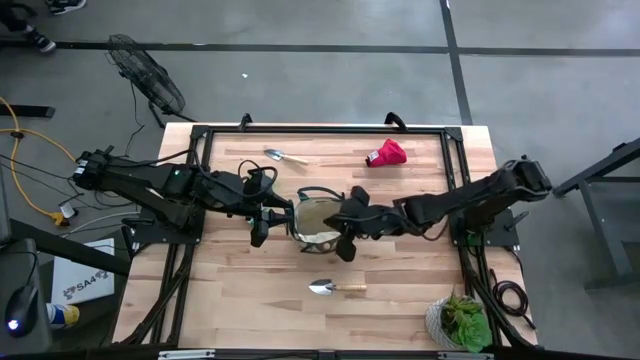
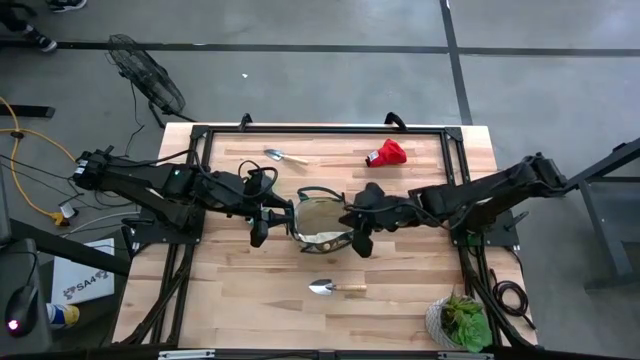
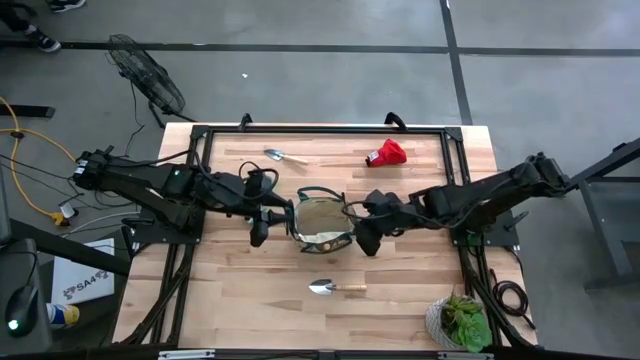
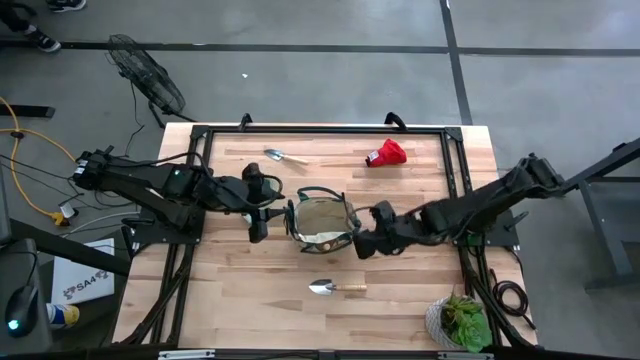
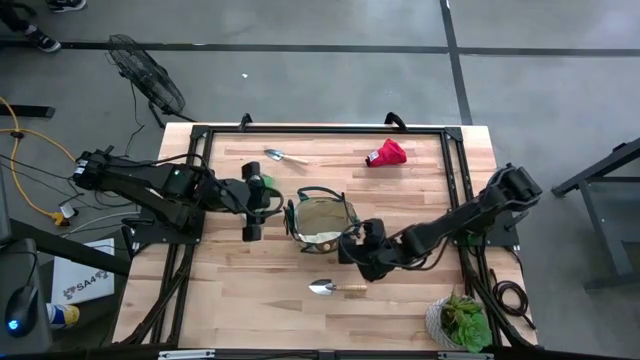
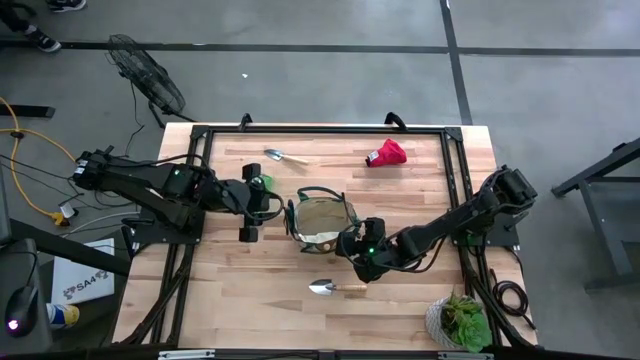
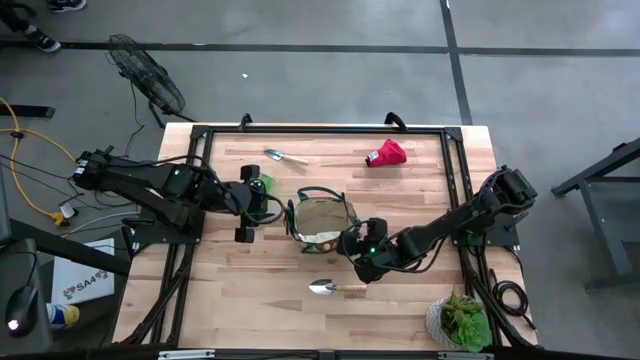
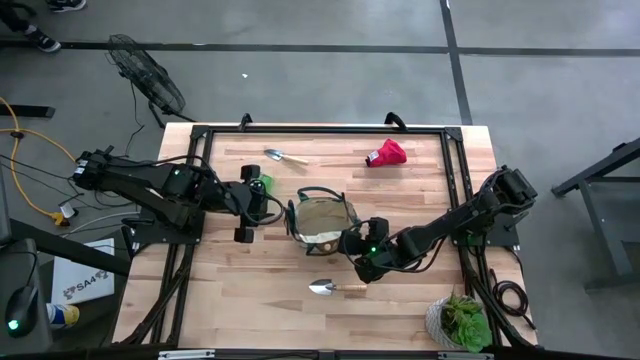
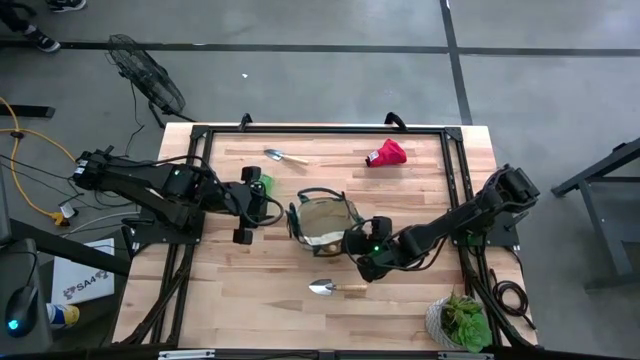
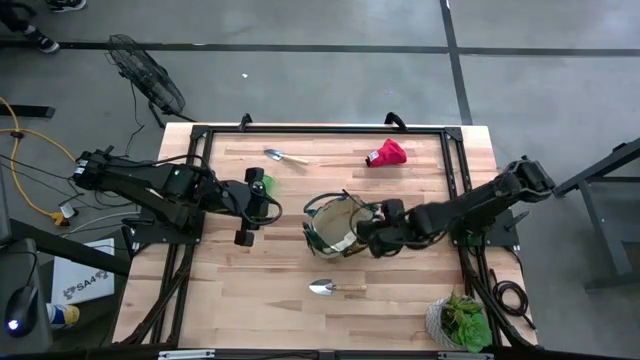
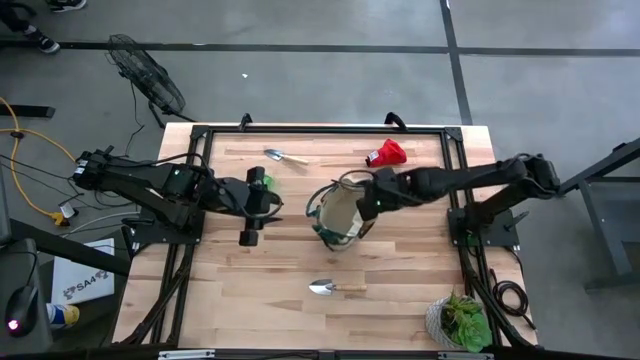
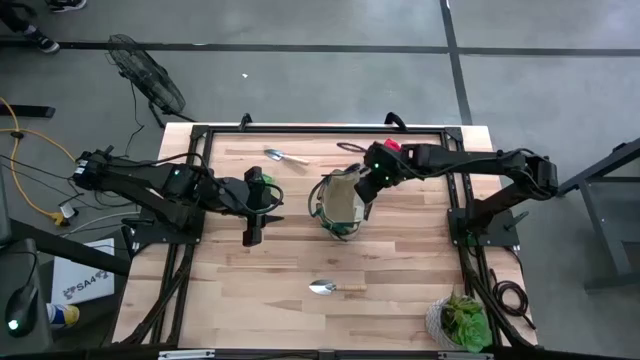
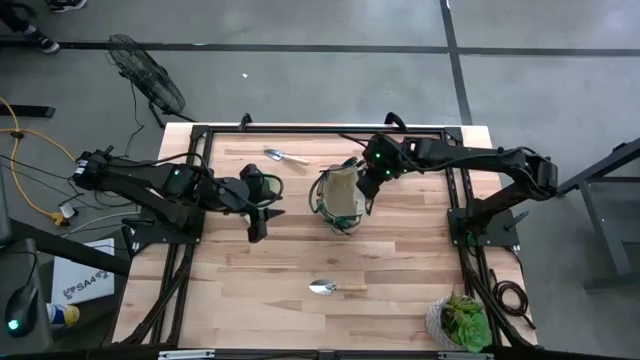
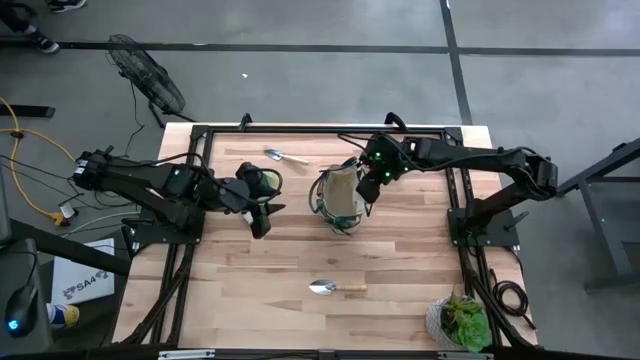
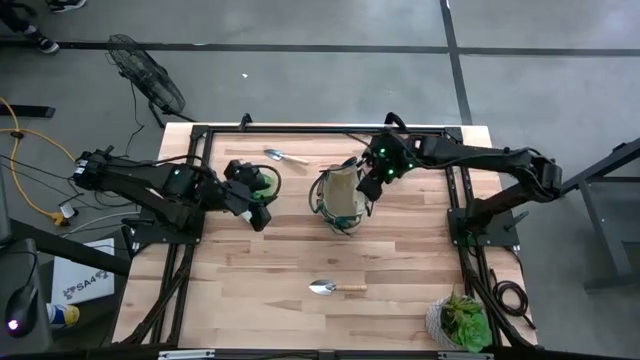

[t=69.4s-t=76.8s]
Task: Pick & Place Garden tools in Gardening bag
Adjust the gardening bag

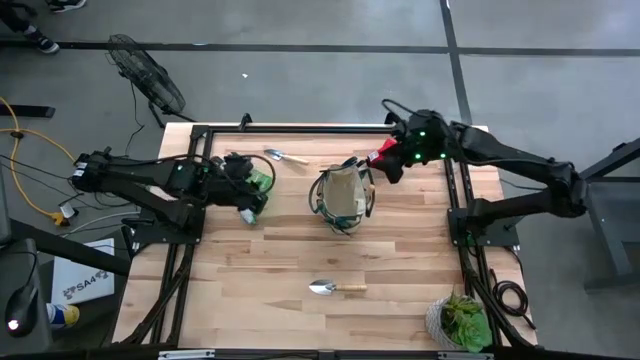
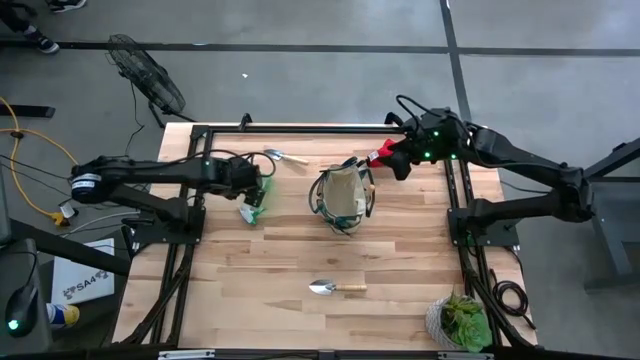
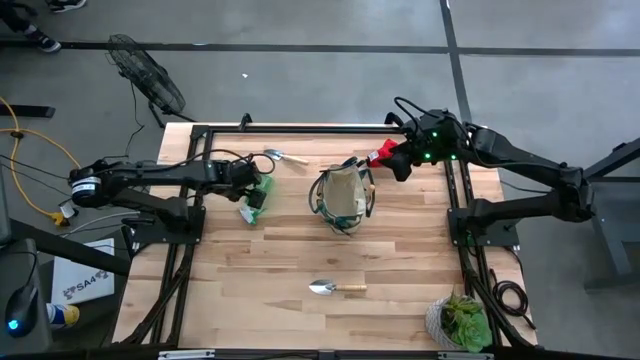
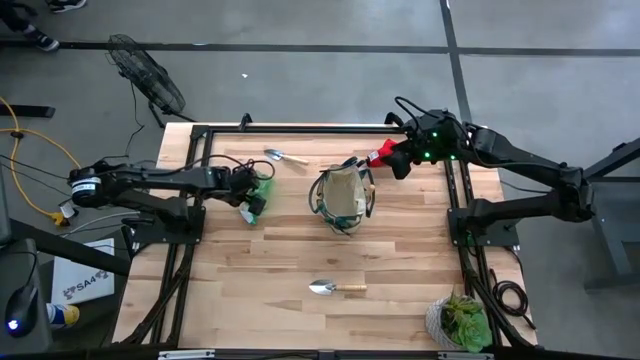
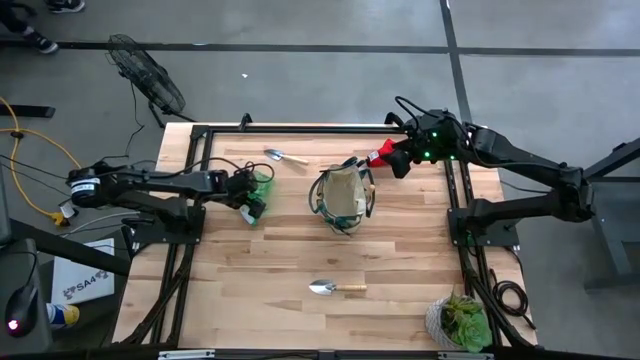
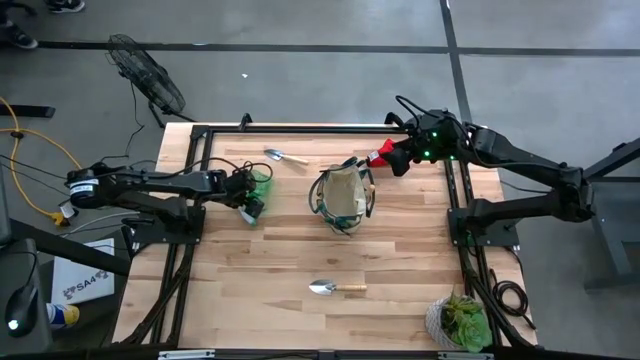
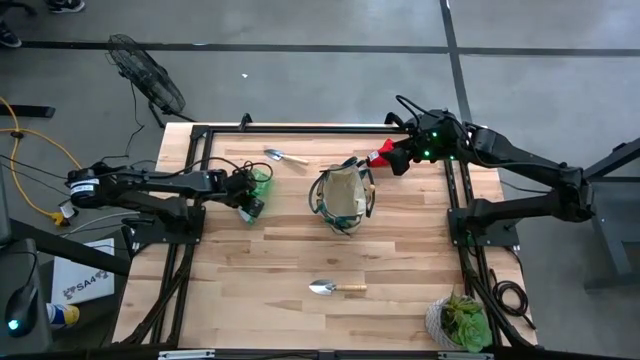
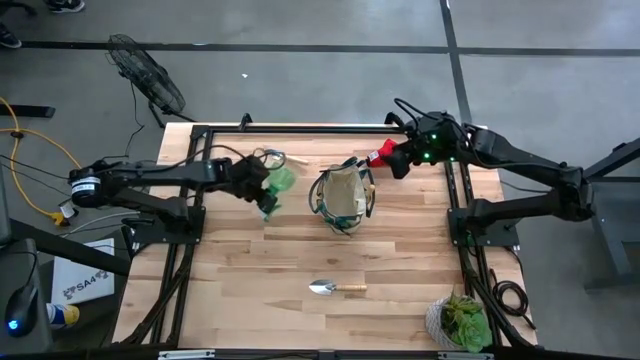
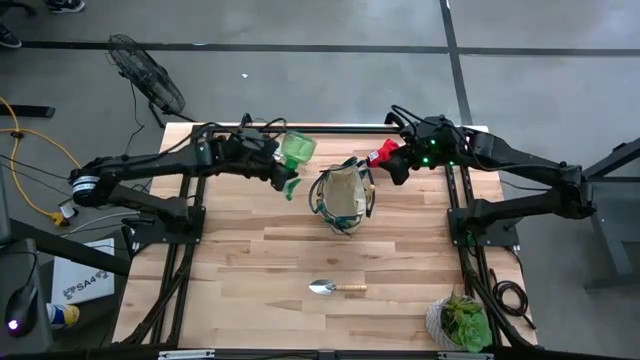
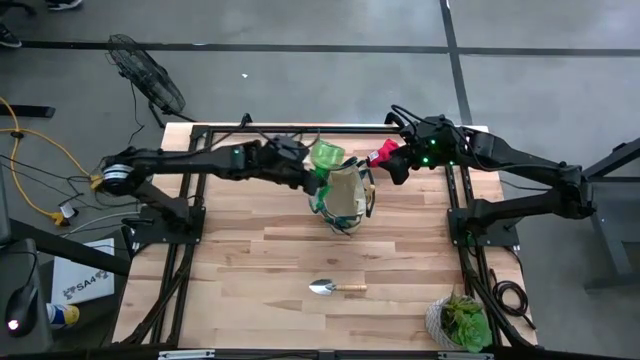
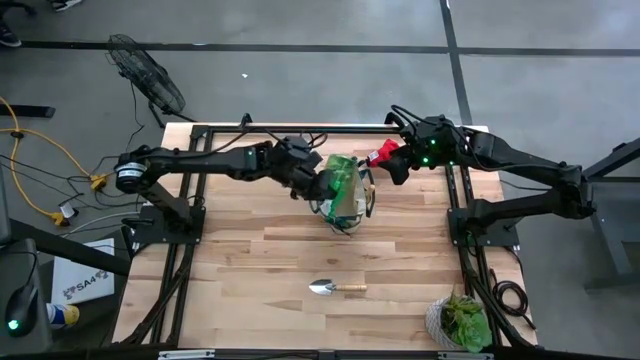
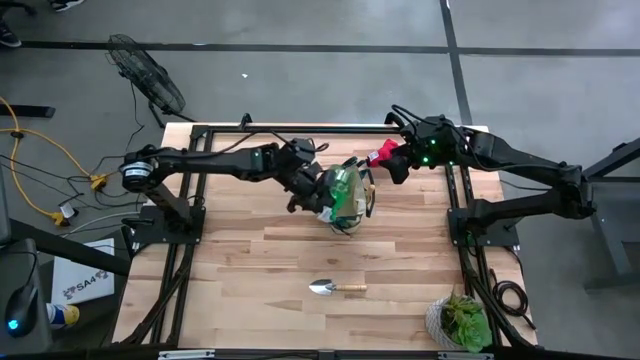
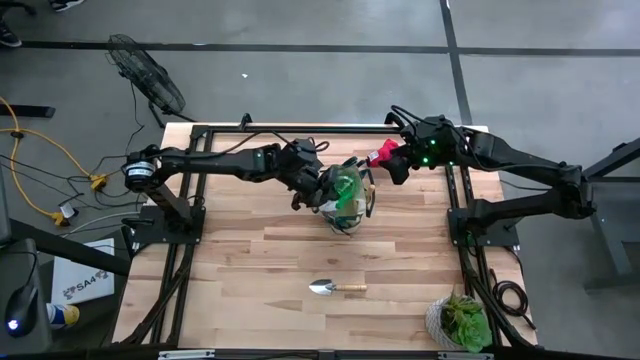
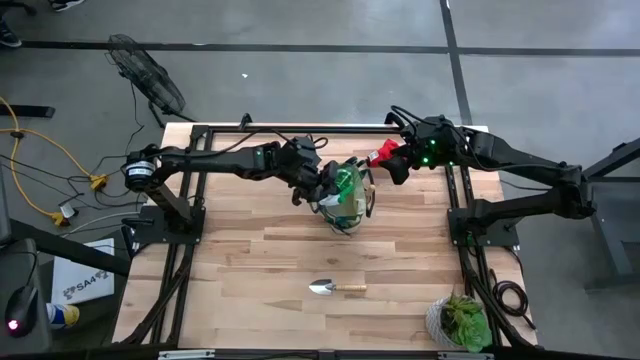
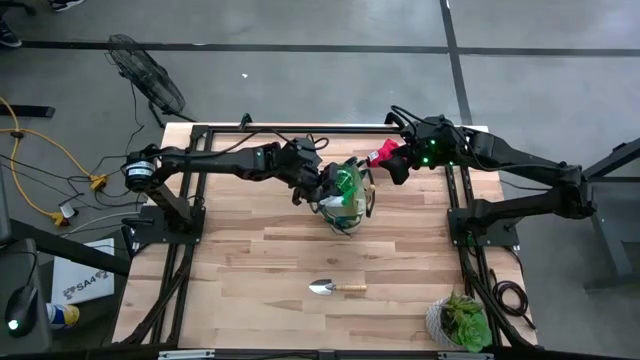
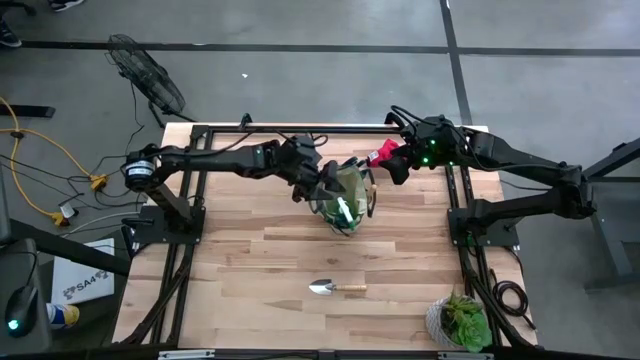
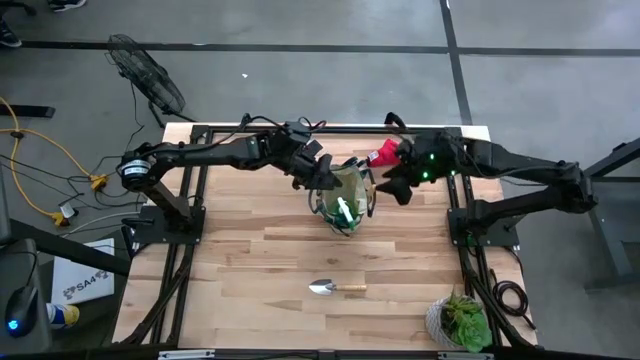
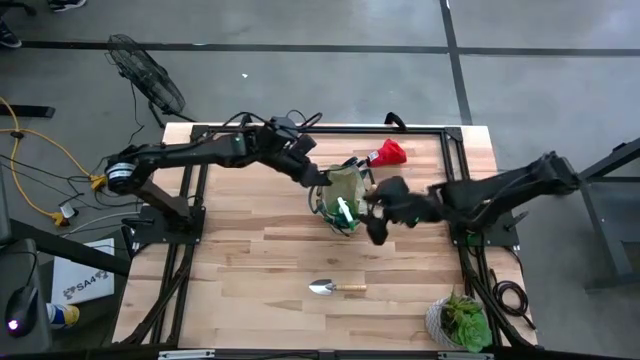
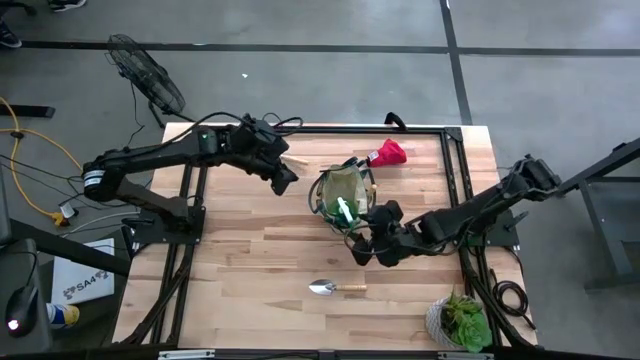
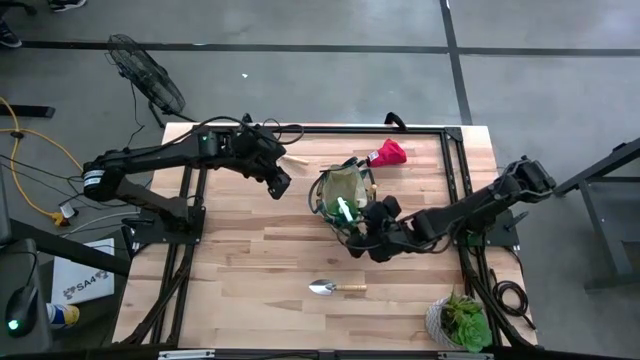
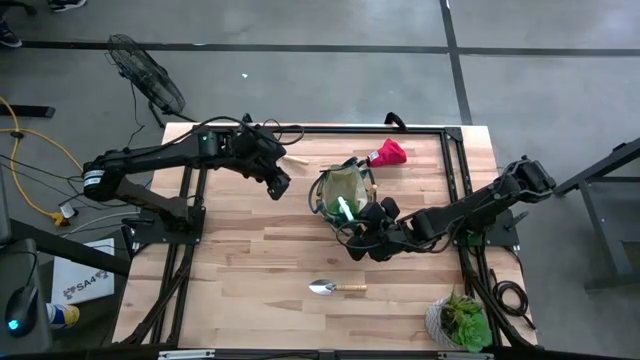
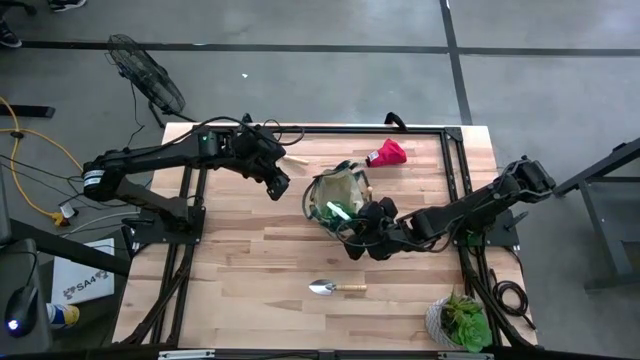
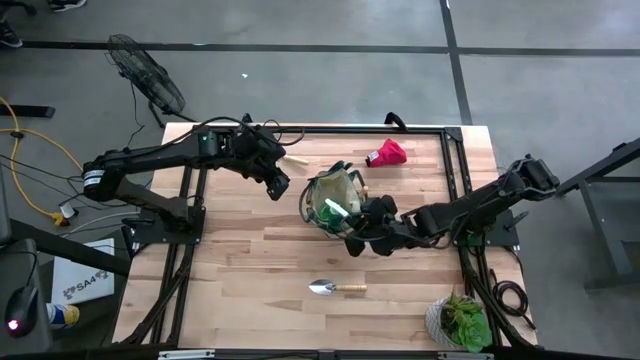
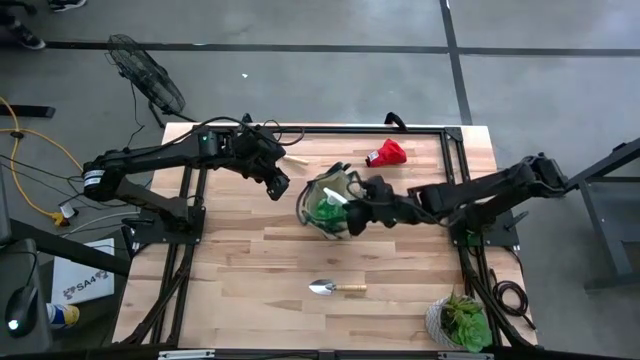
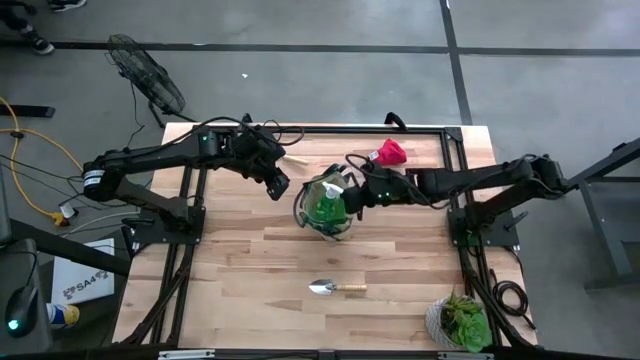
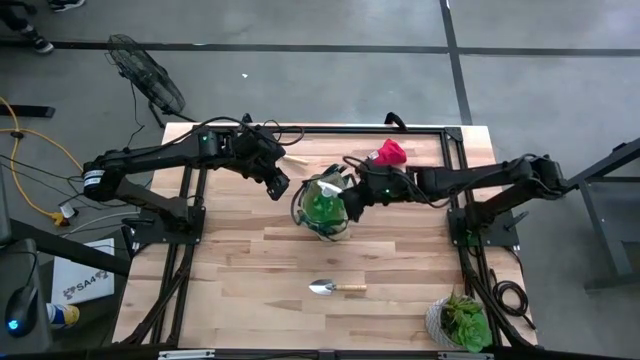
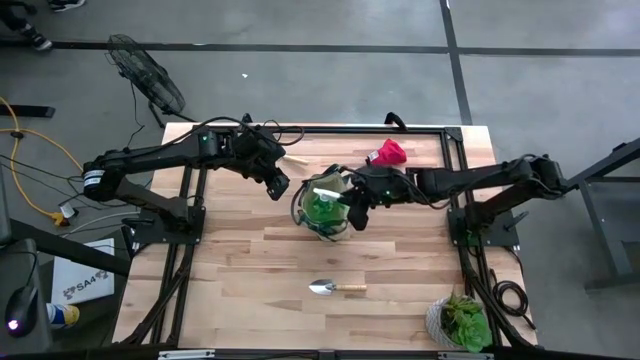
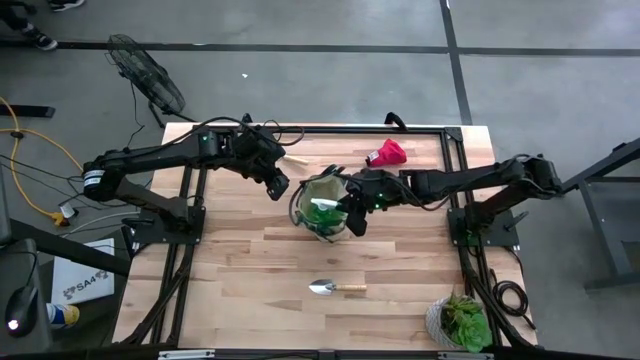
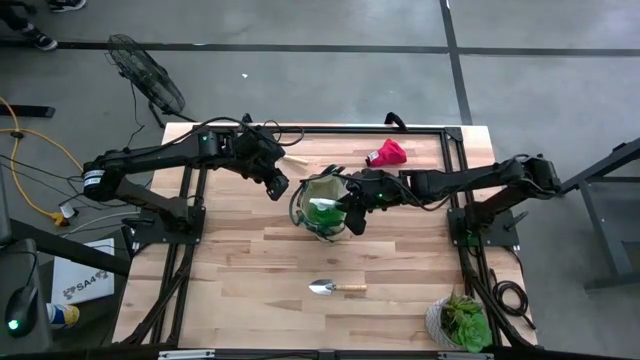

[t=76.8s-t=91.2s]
Put the green spray bottle into the gardening bag
